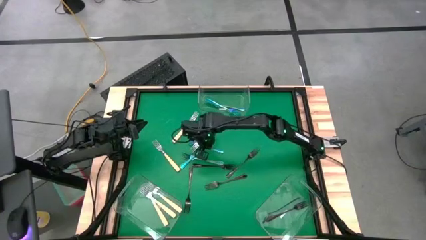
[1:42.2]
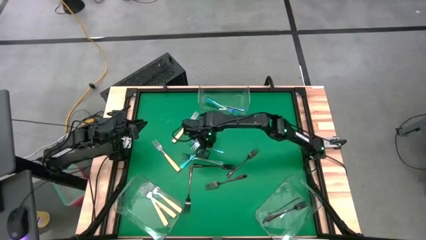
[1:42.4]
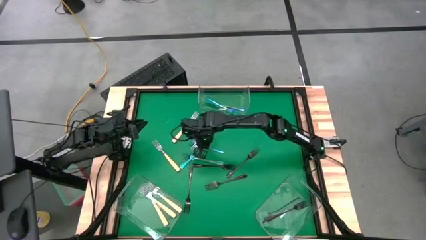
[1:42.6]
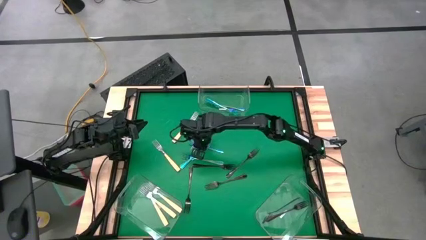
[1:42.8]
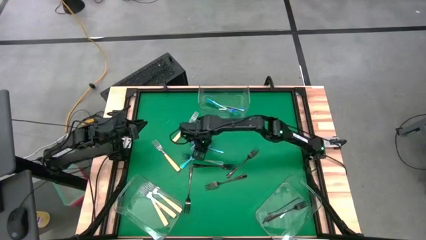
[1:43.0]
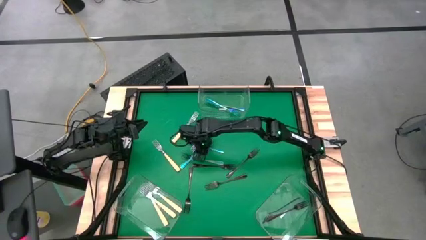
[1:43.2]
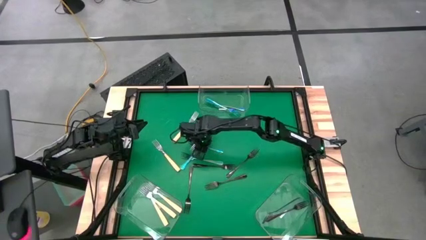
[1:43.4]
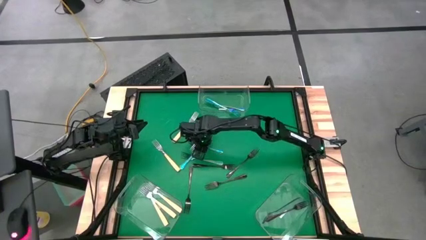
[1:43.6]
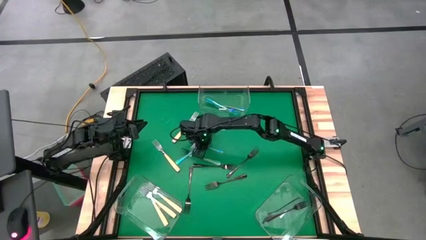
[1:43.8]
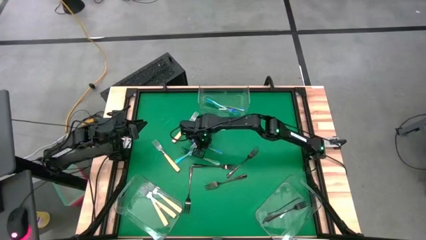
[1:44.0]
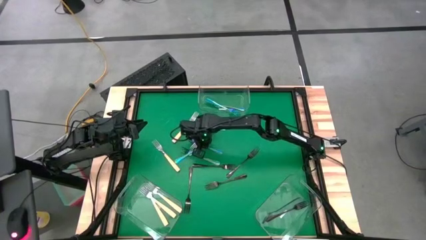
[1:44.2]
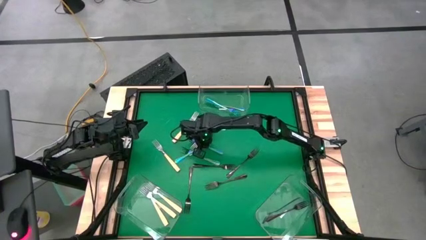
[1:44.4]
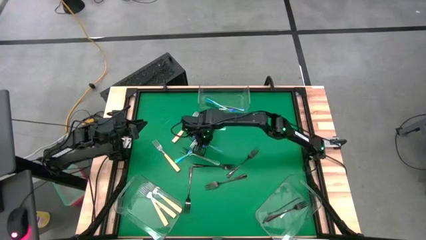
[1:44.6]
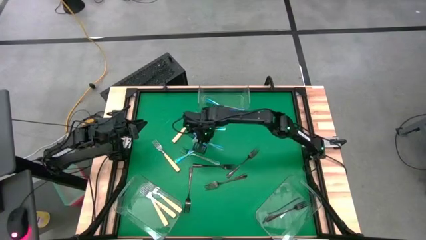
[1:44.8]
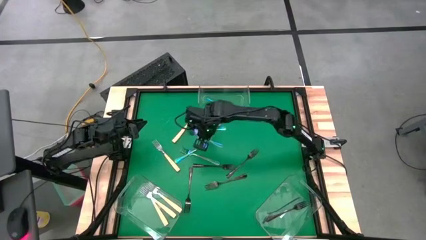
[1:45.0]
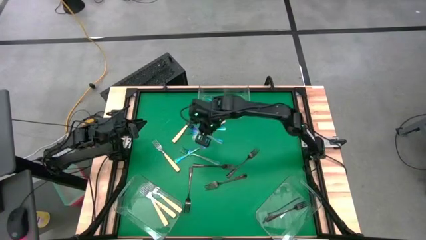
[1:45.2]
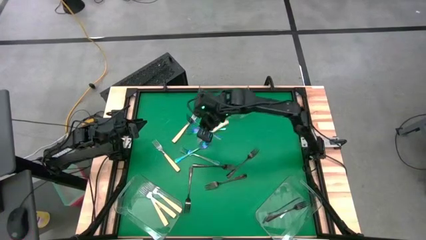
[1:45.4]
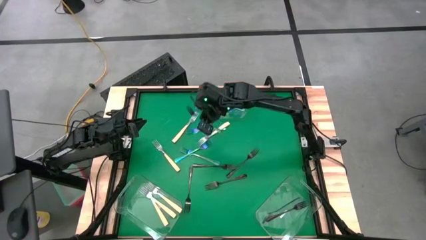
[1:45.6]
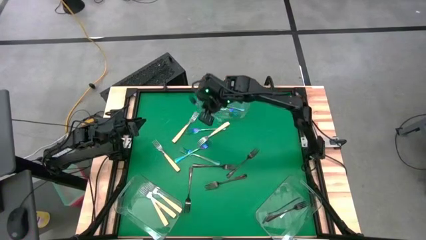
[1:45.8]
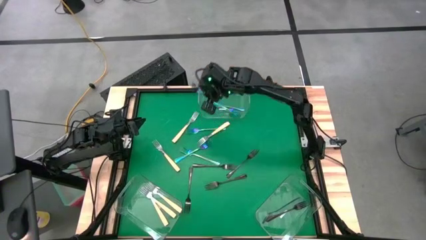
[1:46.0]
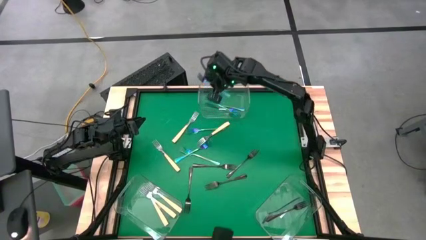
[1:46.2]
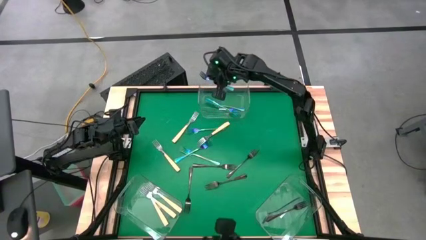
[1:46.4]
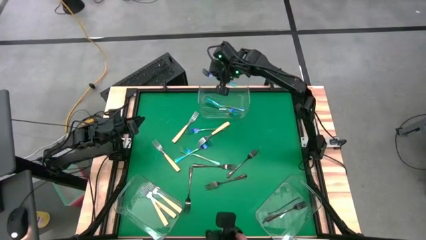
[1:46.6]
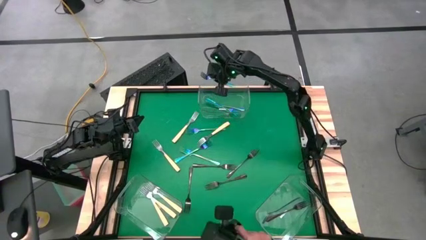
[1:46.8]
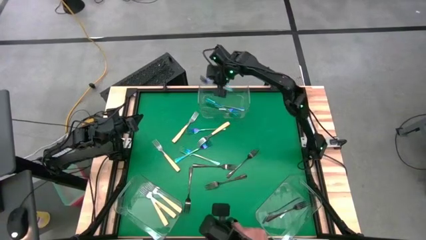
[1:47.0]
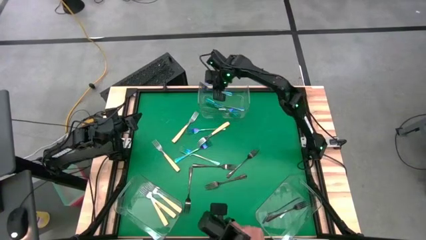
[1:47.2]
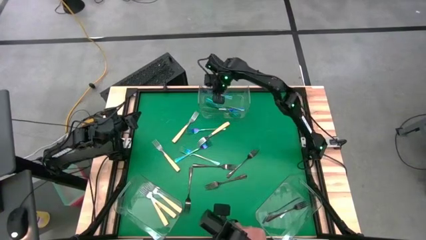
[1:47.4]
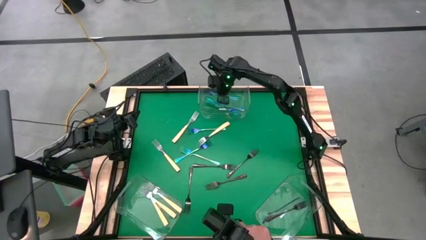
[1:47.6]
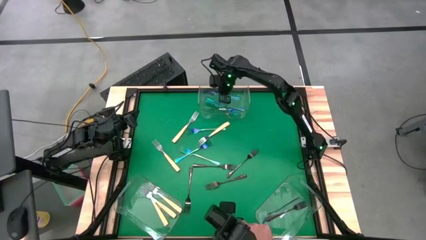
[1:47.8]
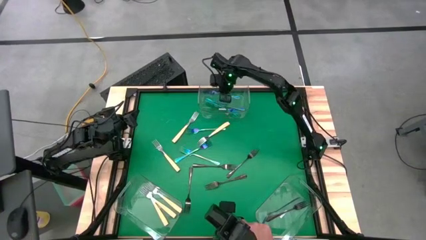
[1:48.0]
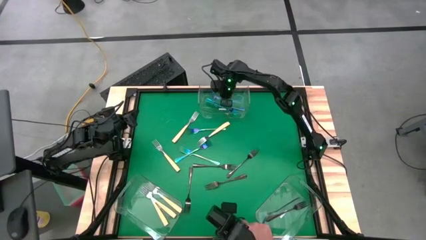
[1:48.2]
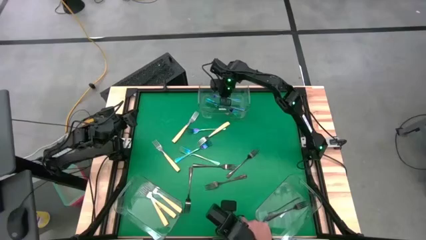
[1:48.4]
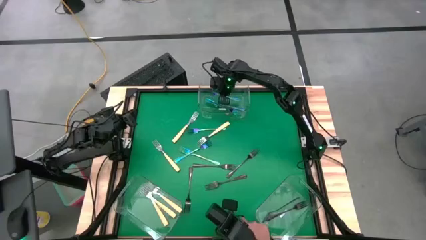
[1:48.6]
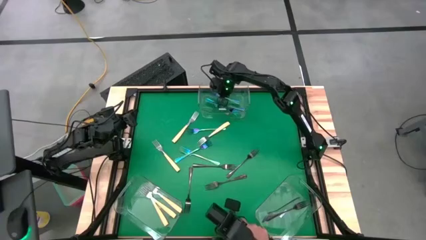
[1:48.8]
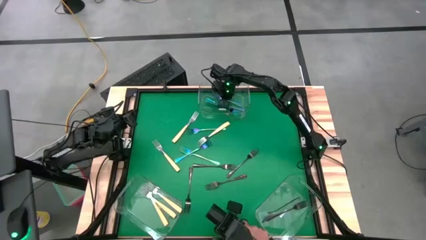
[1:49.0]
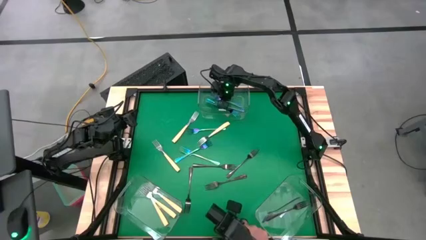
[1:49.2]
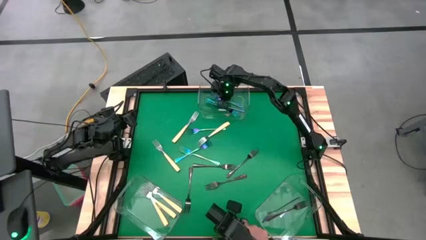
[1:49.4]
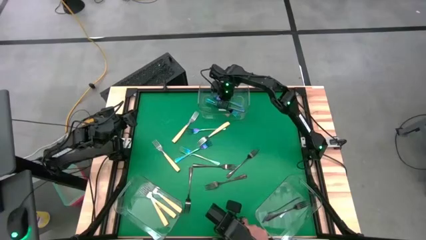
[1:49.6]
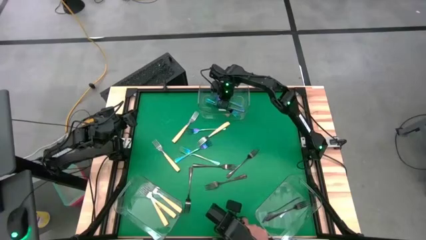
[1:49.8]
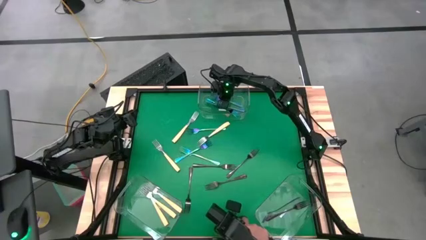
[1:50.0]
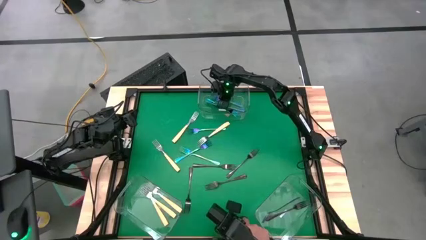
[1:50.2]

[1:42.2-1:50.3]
Task: Sort silverware by color (type)
Put the blue fork into the top transparent bin

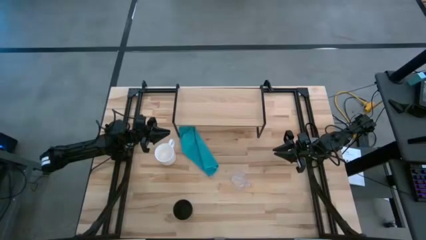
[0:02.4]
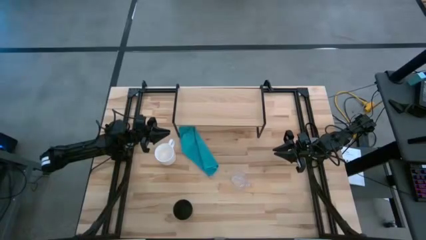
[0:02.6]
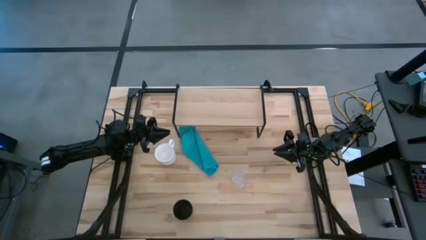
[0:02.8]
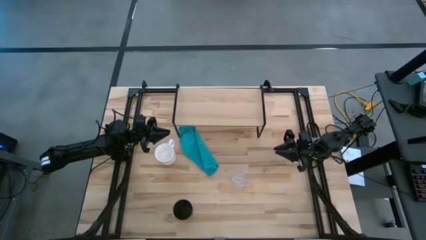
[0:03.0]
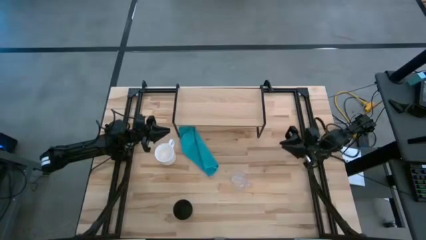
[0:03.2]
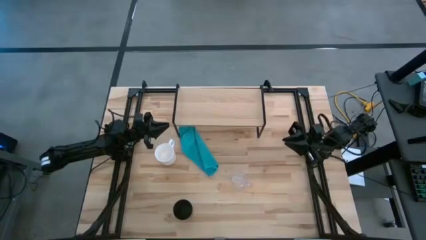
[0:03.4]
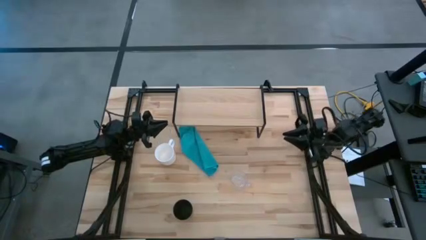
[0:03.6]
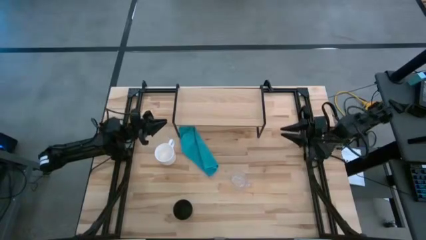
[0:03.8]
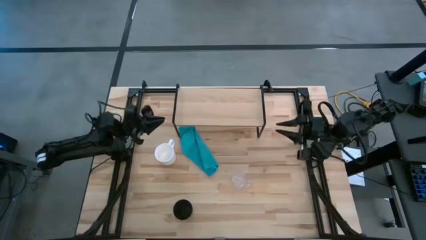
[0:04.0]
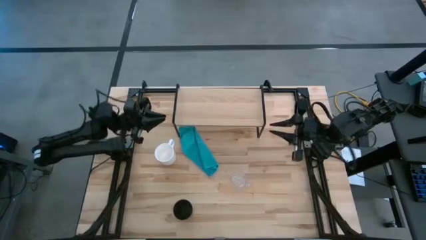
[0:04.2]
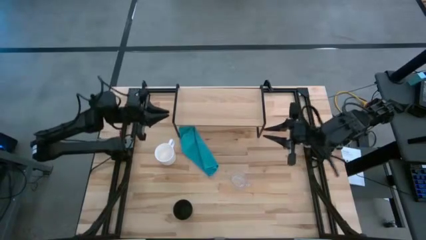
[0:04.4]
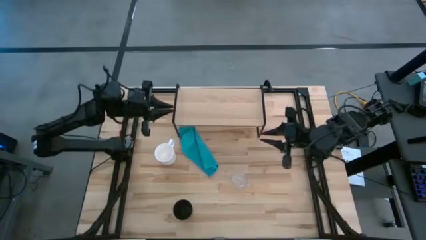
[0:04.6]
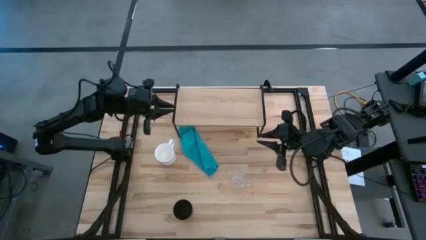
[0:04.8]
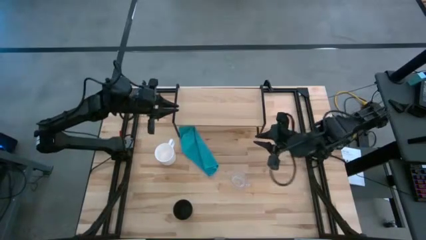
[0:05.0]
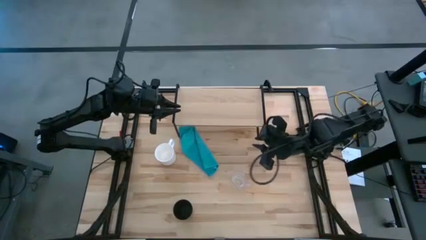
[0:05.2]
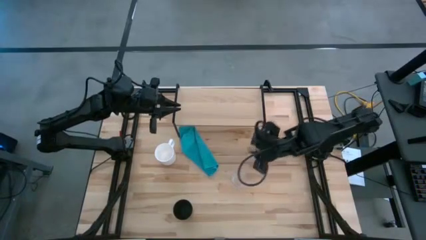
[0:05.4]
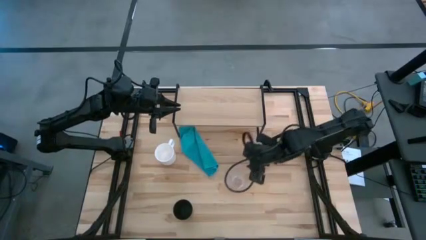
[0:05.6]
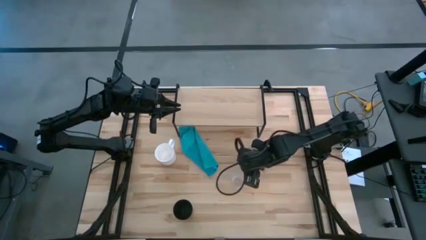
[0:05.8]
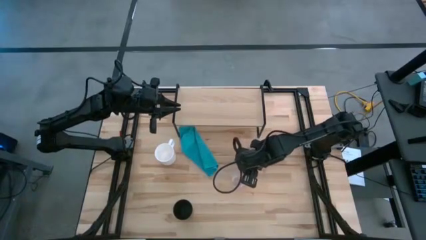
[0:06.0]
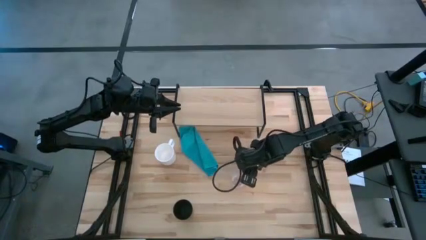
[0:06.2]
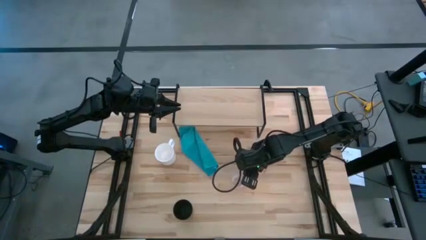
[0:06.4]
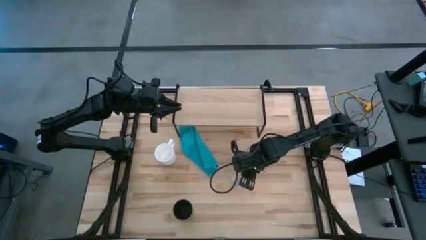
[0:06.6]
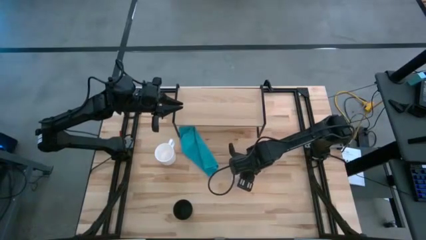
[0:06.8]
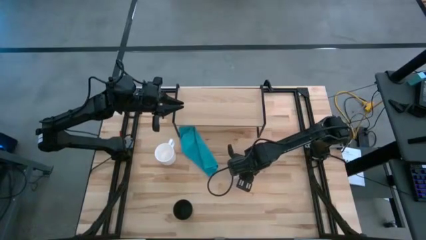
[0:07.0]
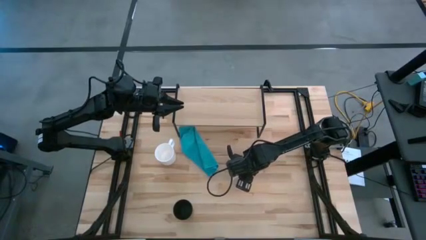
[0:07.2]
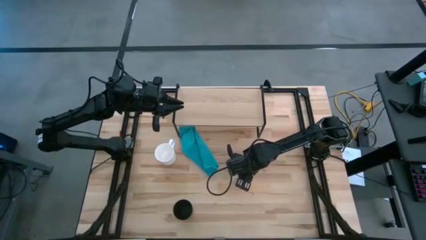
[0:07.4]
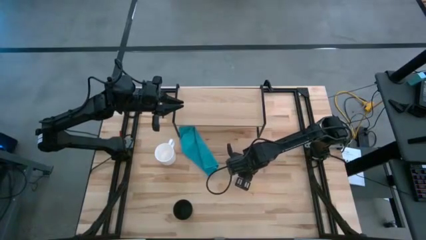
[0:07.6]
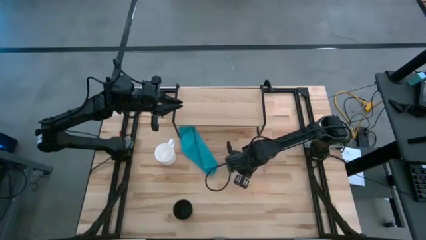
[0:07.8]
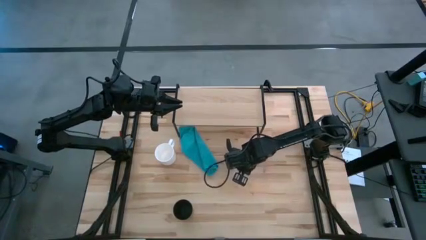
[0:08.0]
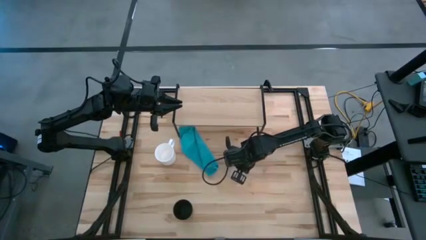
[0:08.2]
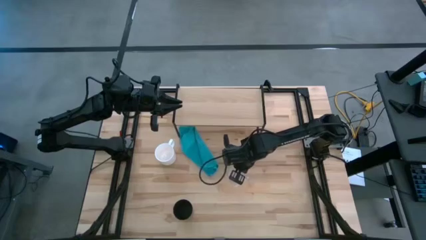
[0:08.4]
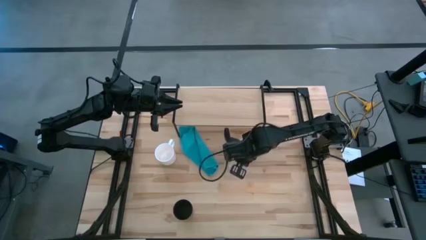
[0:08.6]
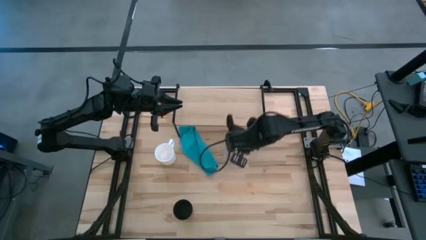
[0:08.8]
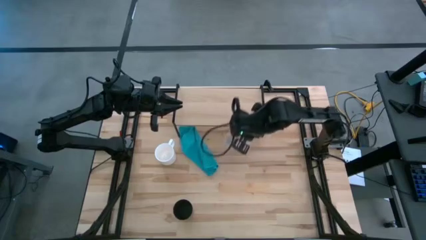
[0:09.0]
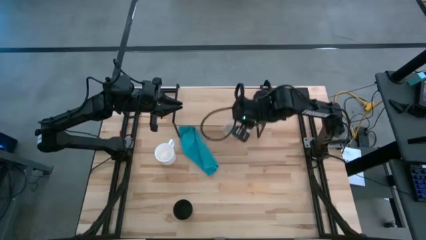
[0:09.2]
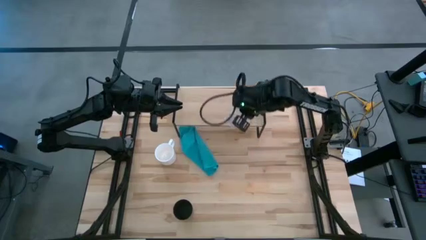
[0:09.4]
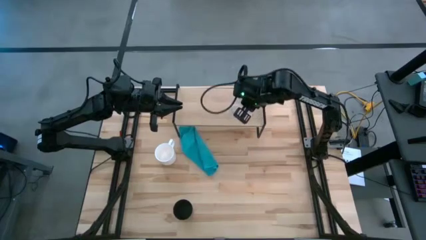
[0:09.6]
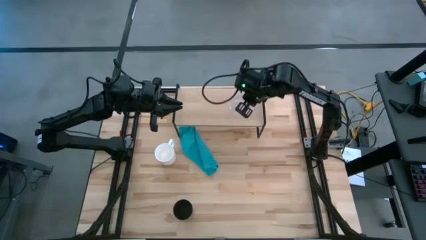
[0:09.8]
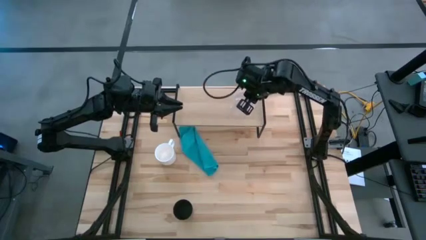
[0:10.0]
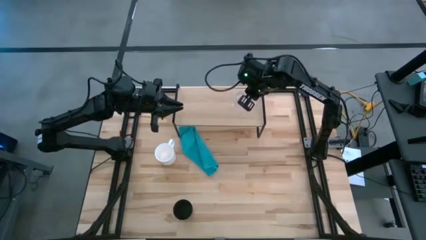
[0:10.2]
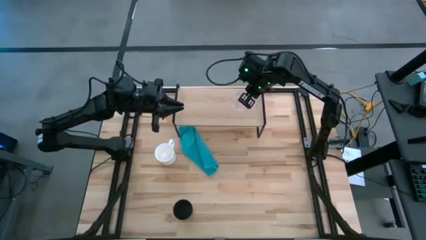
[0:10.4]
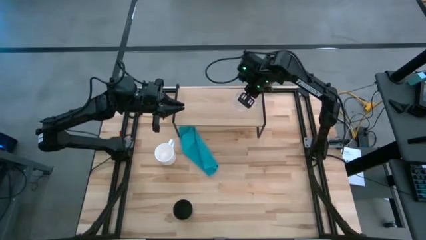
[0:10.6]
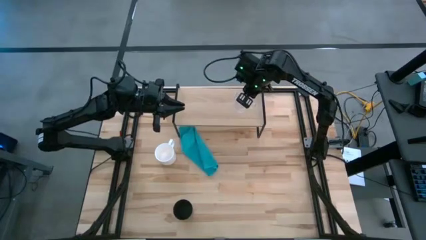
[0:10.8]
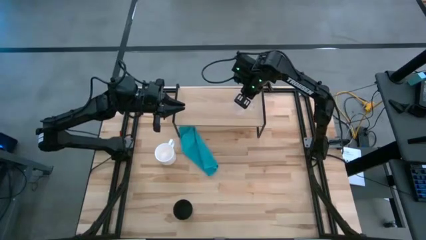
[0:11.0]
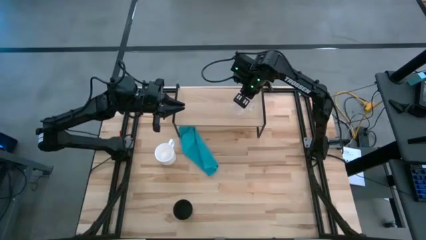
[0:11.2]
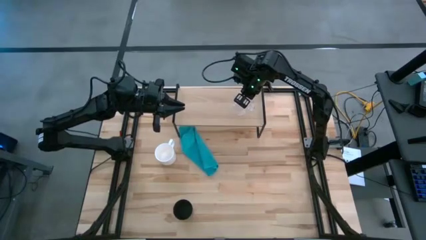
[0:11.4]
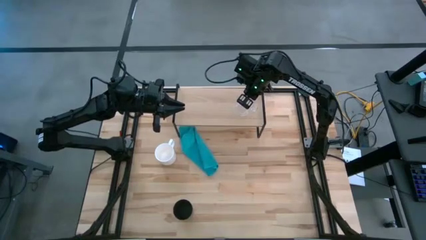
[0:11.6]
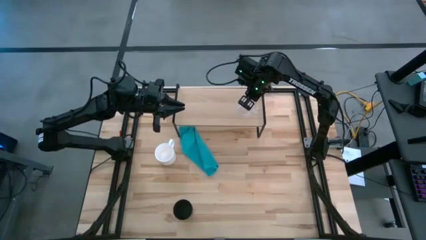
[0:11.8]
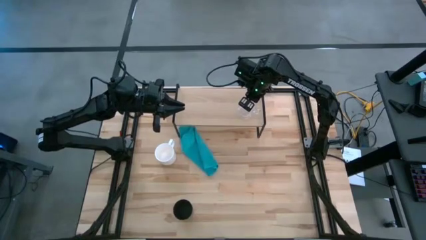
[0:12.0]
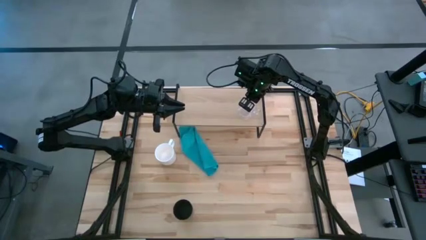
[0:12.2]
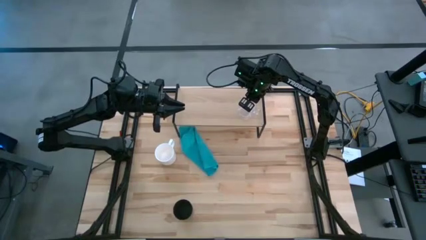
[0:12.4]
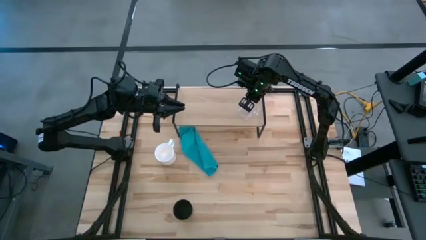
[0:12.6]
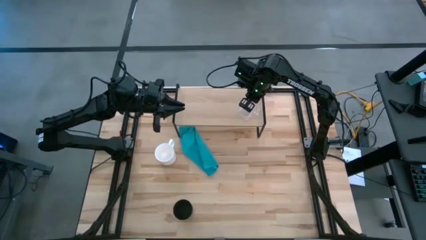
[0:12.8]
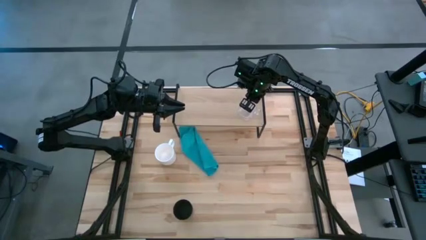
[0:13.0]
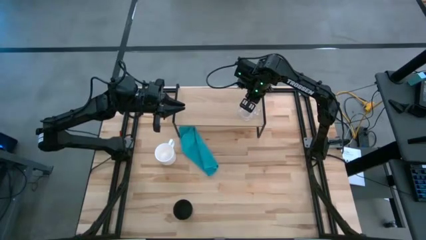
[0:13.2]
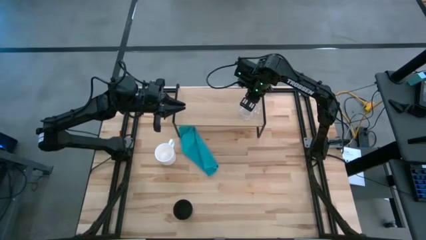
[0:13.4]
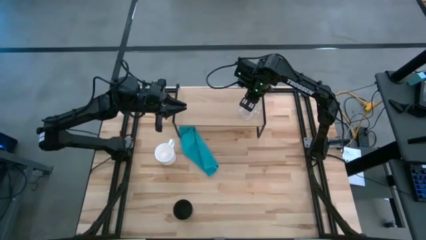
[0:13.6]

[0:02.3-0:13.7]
Task: Stack small to large cups/mugs on shelf
Put the transparent mug on the shelf
